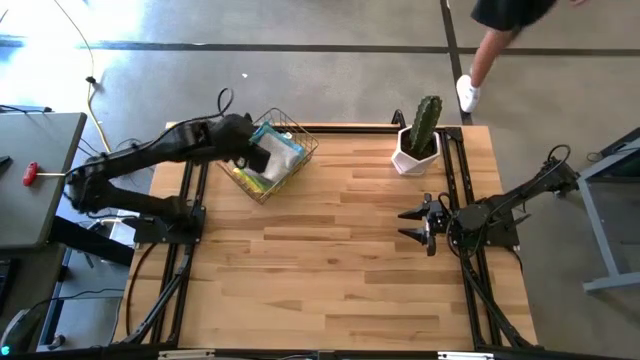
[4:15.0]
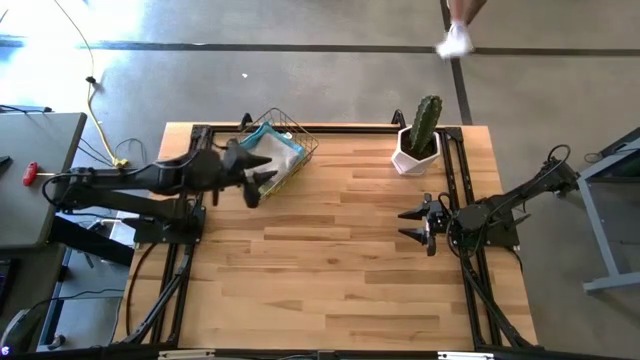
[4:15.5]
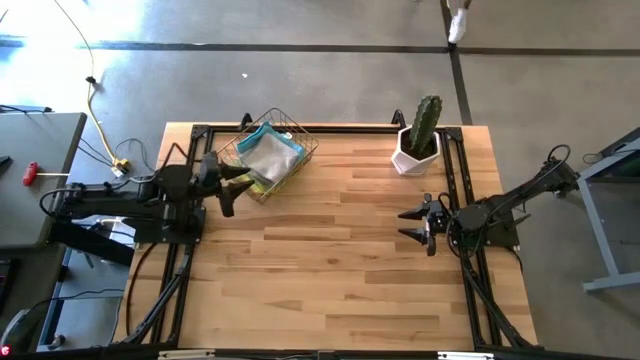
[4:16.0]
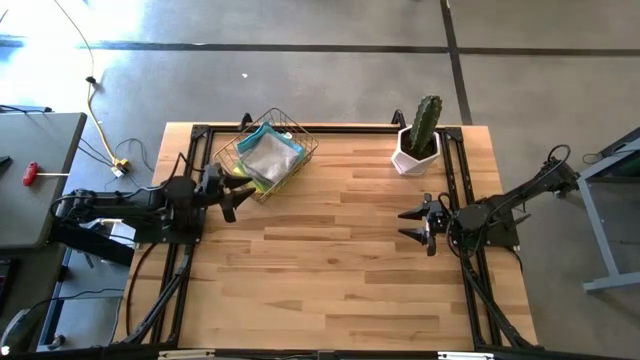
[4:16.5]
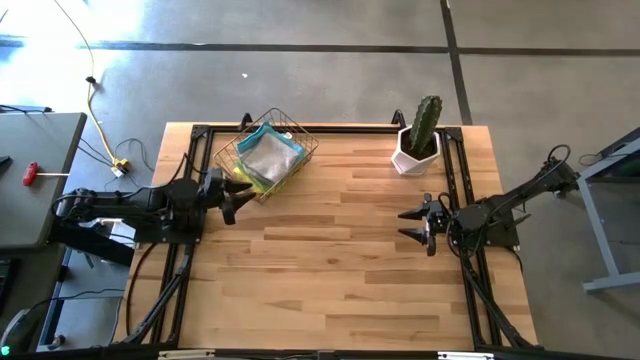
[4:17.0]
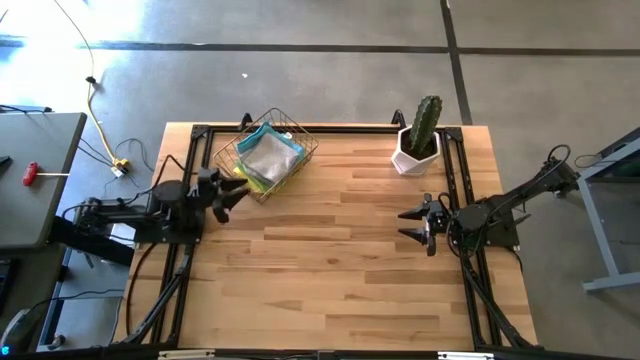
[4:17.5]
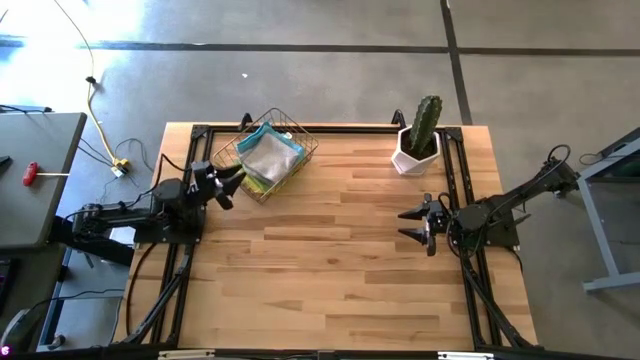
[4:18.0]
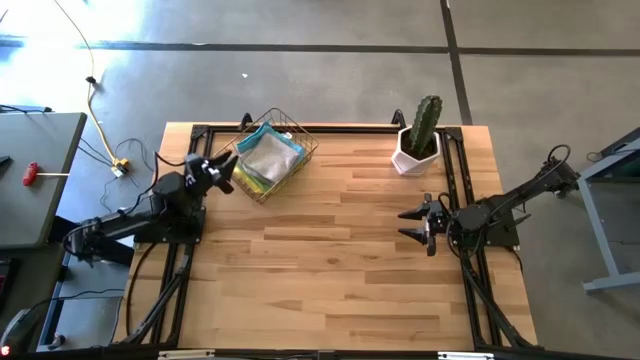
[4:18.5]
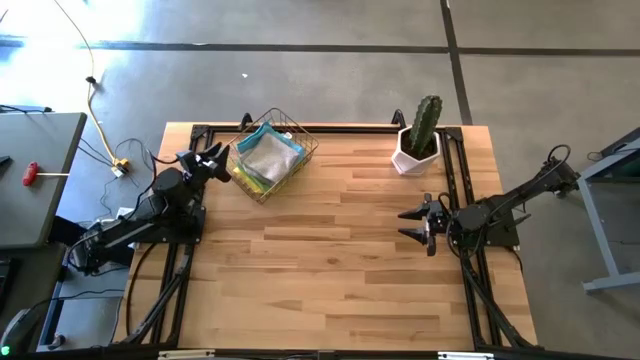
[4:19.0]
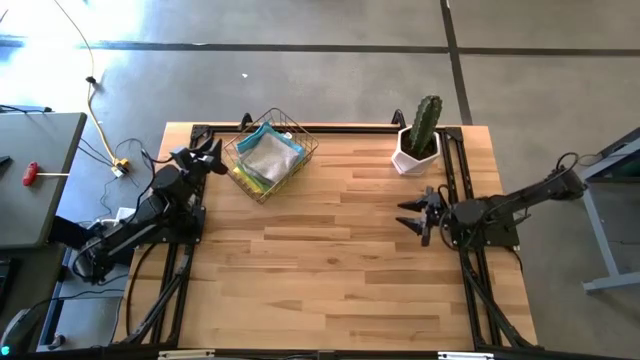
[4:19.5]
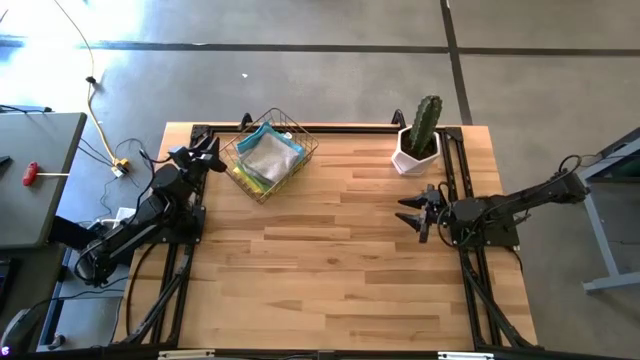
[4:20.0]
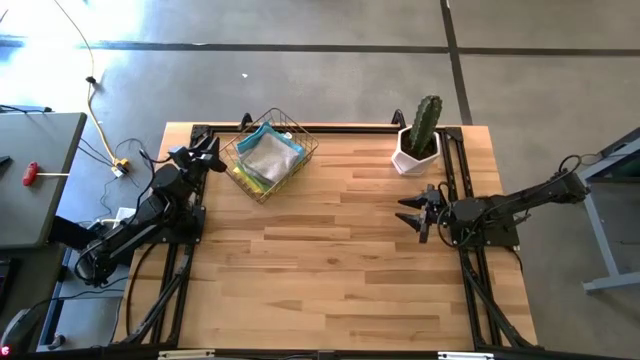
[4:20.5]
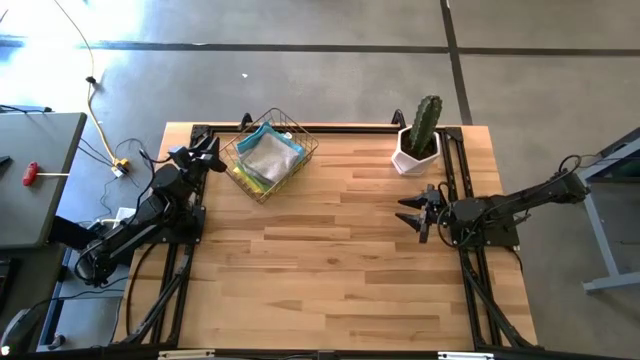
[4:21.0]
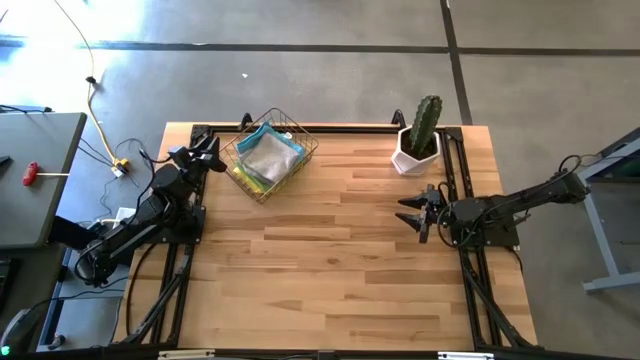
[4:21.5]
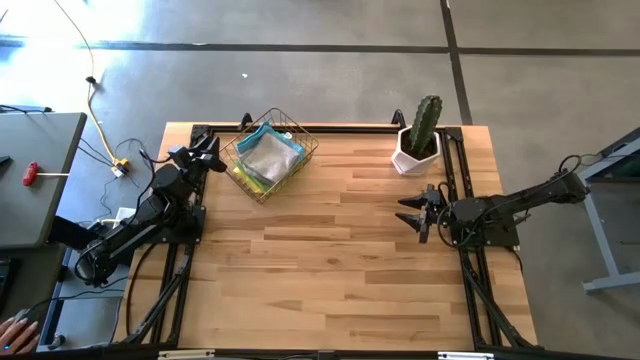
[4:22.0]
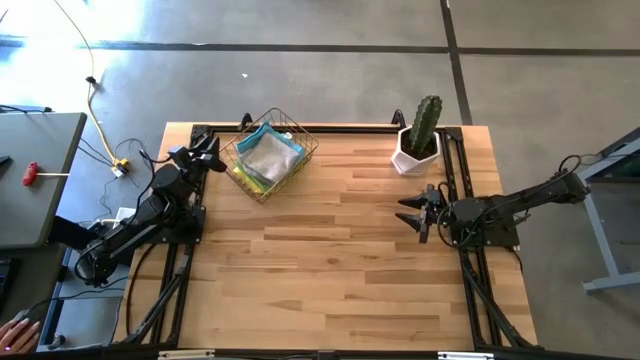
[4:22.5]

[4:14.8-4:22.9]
Task: Fold microfiber towels
Return to Home Position

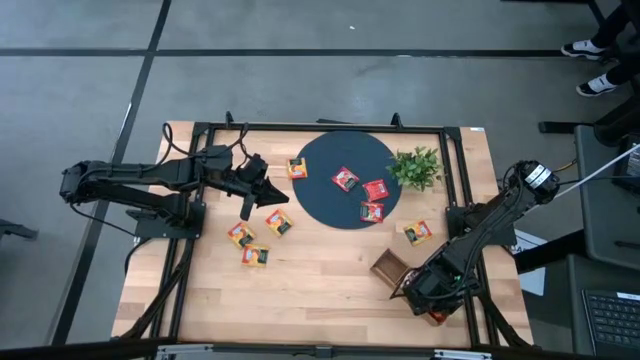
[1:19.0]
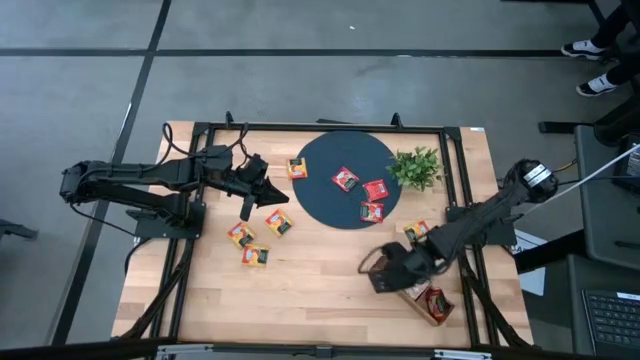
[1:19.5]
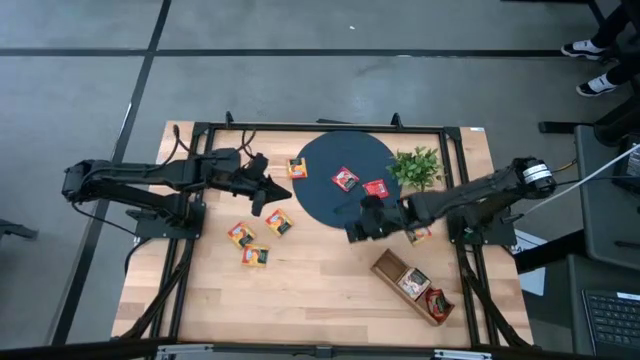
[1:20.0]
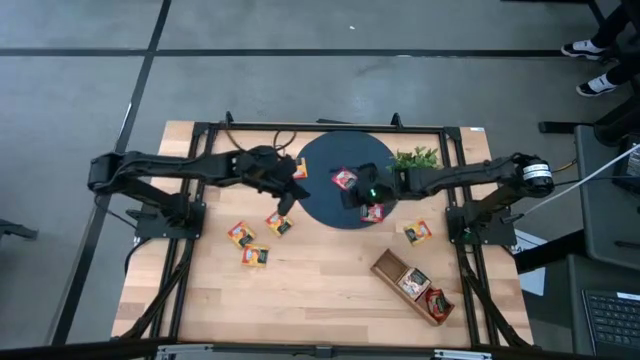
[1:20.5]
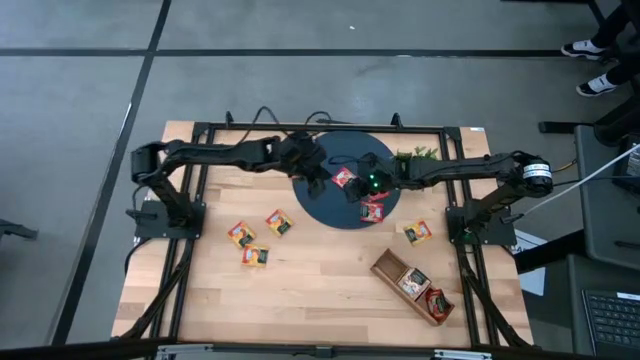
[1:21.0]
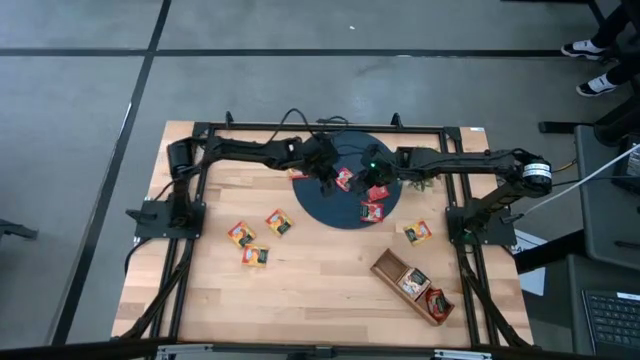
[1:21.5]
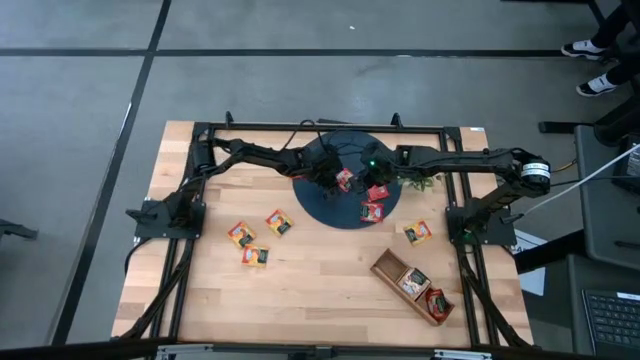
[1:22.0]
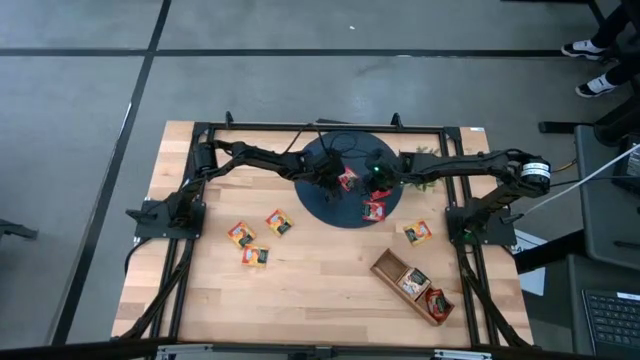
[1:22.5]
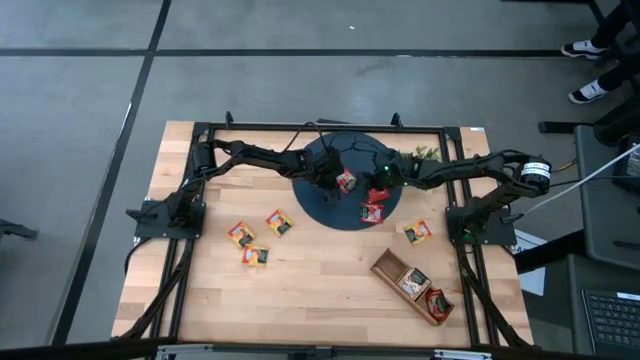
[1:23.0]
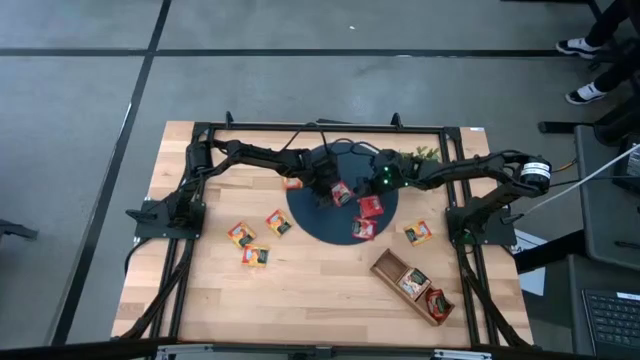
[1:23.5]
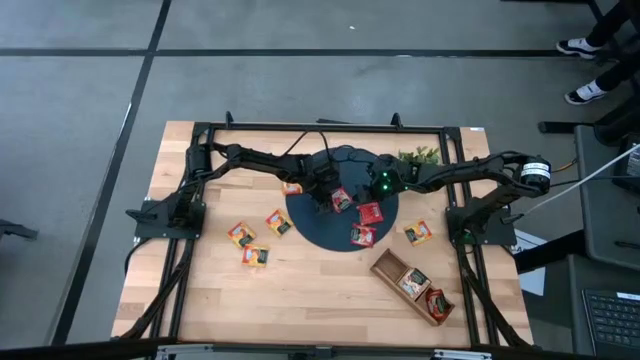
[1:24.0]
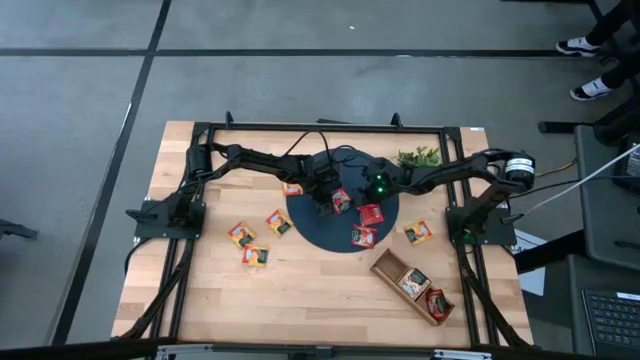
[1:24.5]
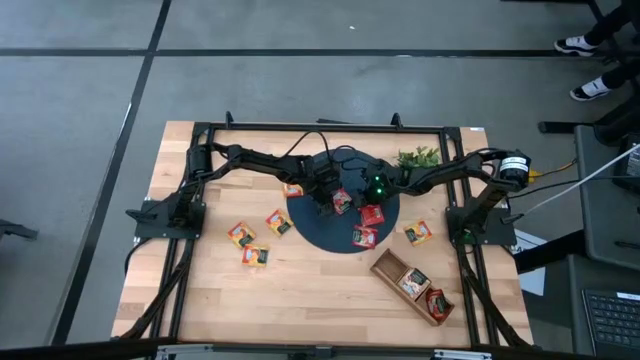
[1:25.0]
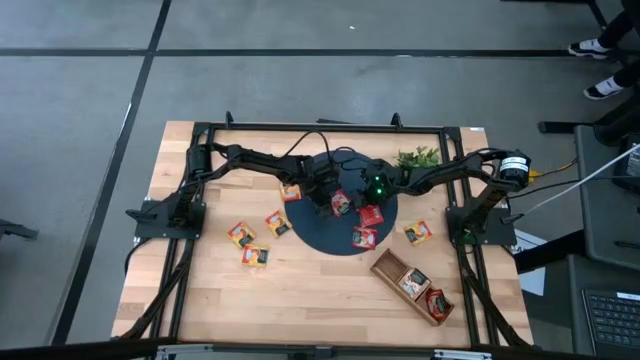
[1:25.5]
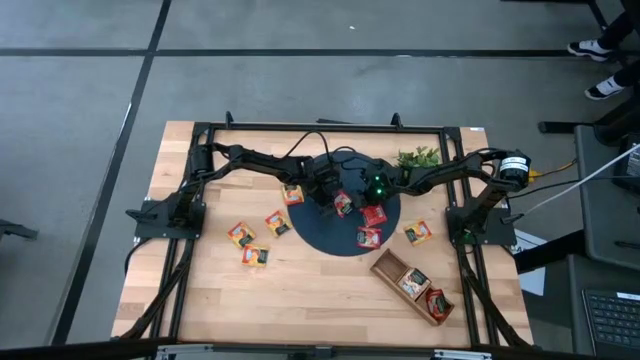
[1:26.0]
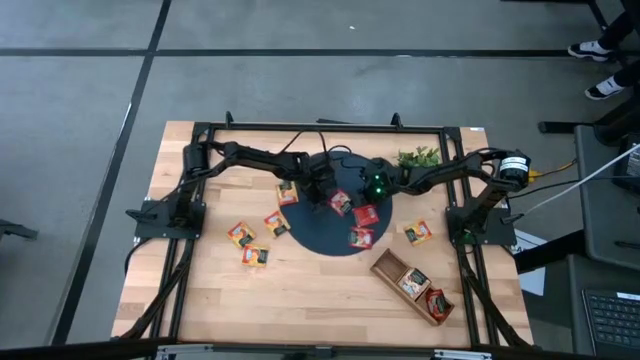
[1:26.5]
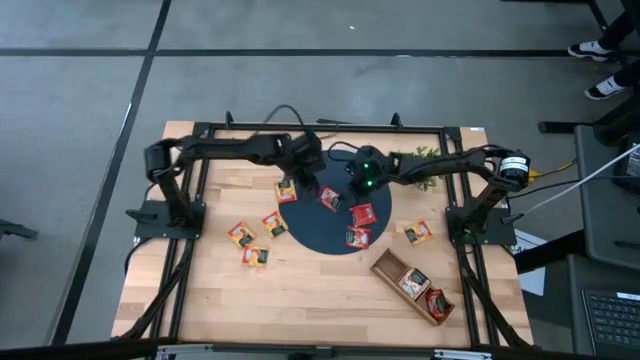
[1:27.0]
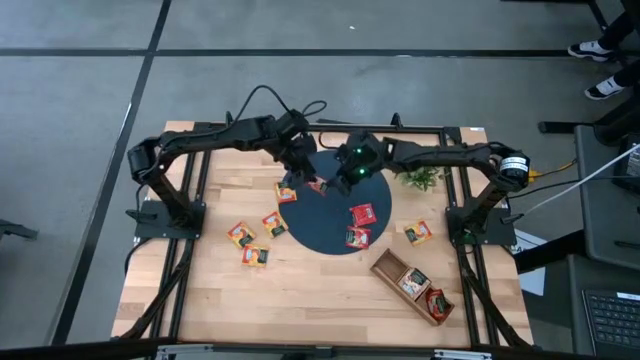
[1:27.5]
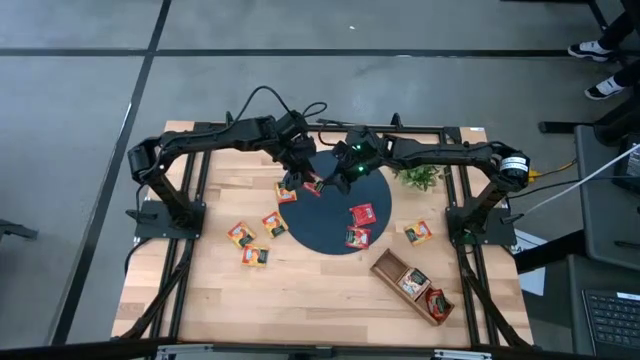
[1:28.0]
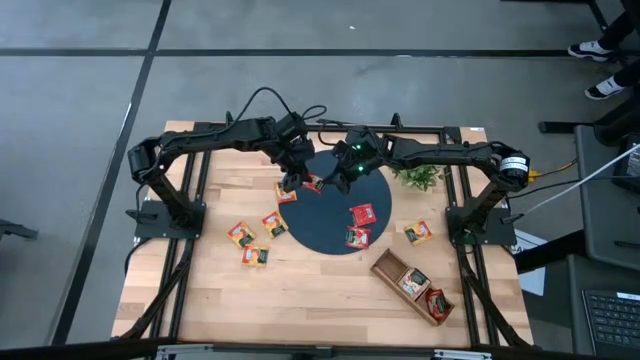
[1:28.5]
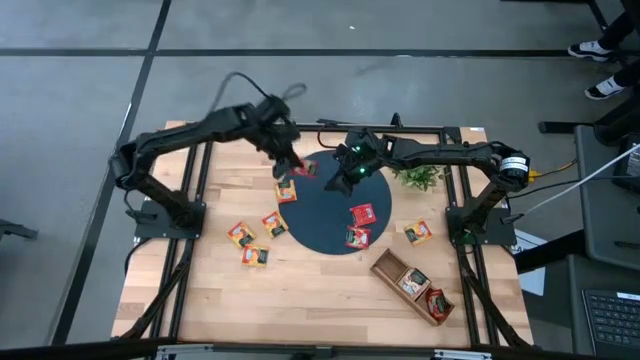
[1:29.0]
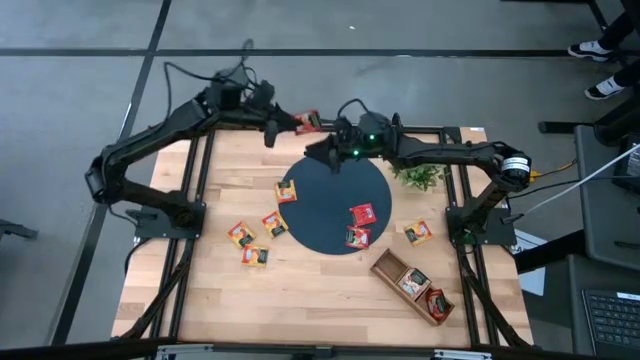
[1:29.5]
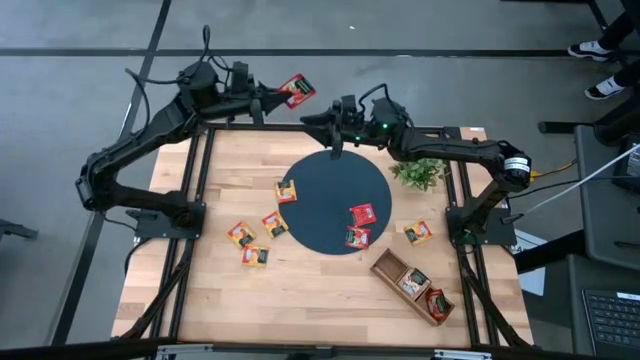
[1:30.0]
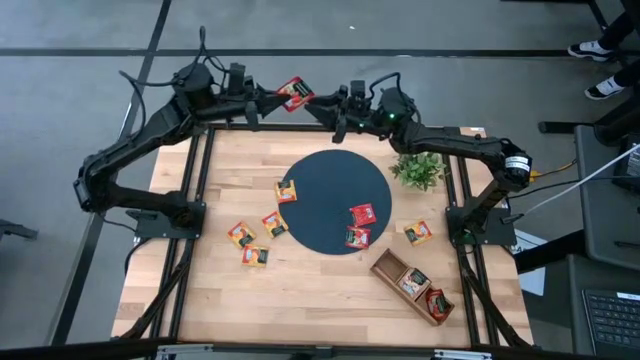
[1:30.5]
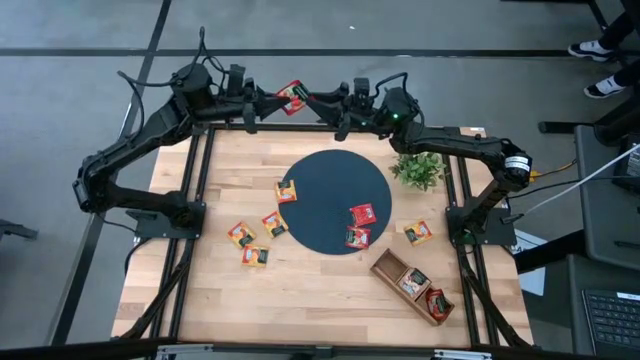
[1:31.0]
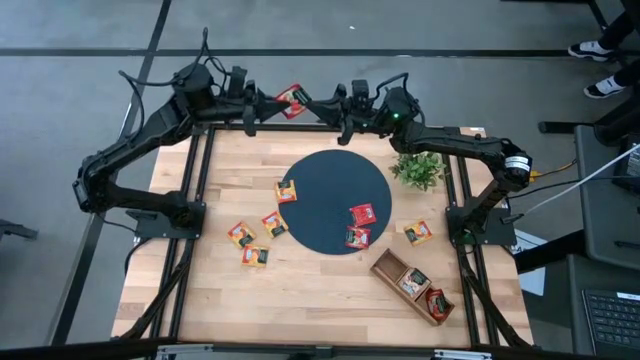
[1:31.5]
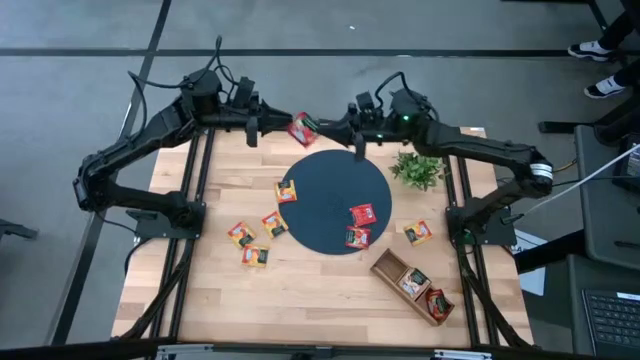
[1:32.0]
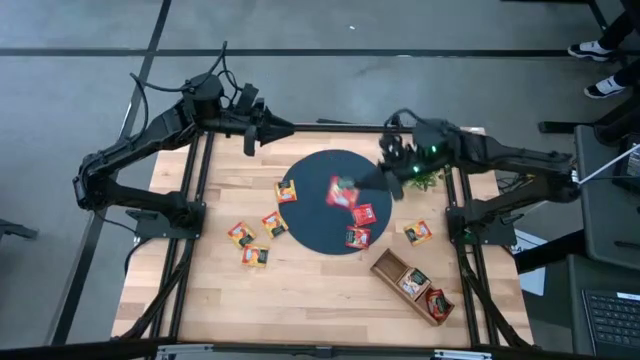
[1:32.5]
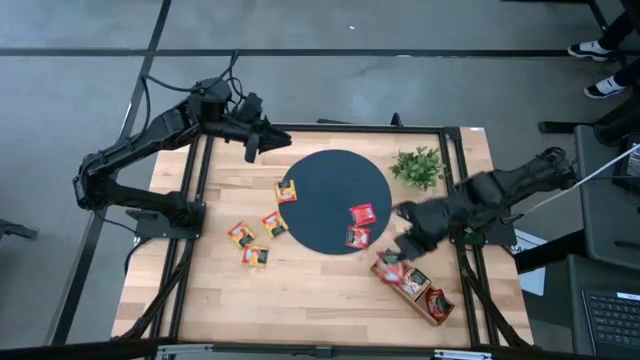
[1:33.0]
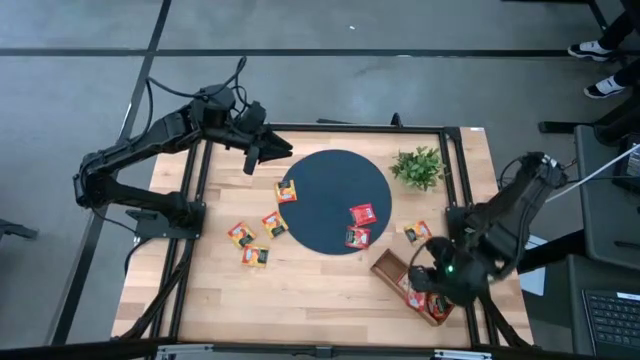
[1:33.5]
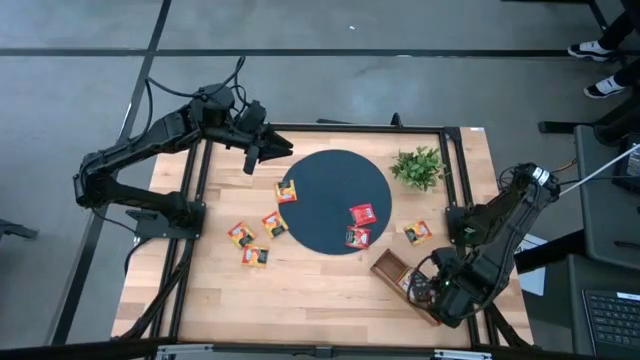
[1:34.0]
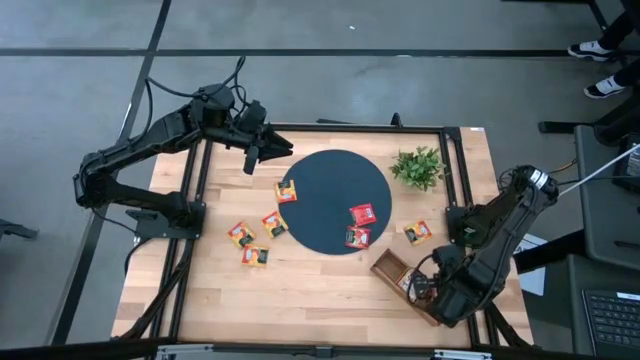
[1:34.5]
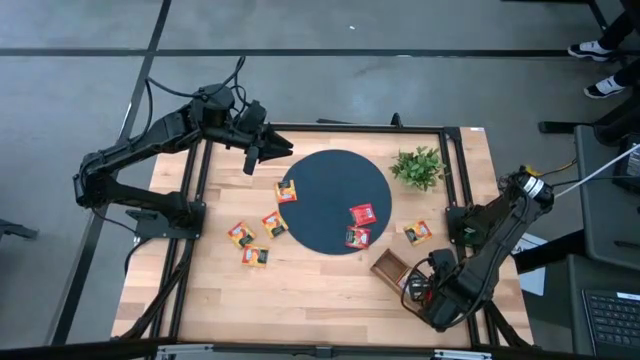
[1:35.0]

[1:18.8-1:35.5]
Task: Pick & Place Tea
Put the red tea bag into the right section of the wooden organizer
